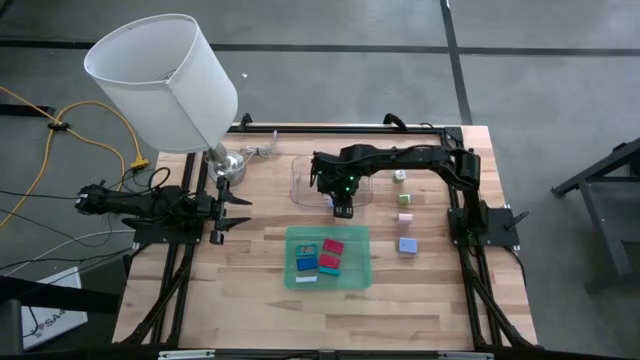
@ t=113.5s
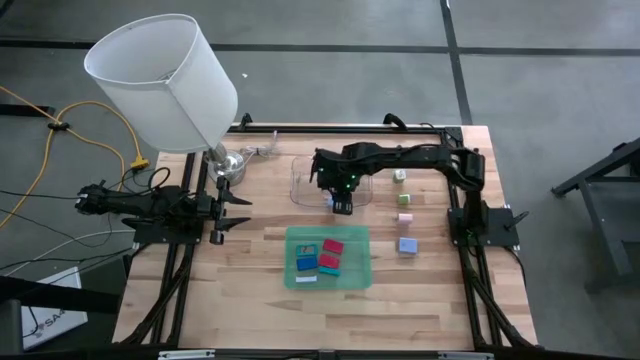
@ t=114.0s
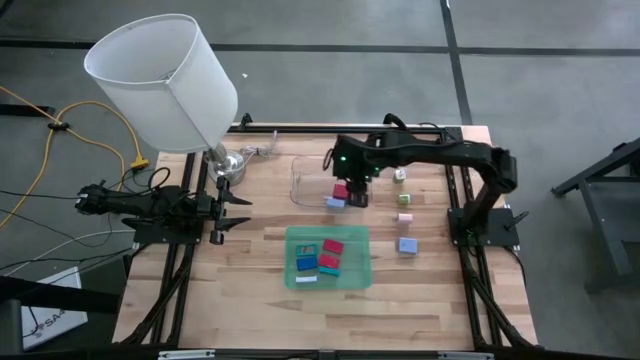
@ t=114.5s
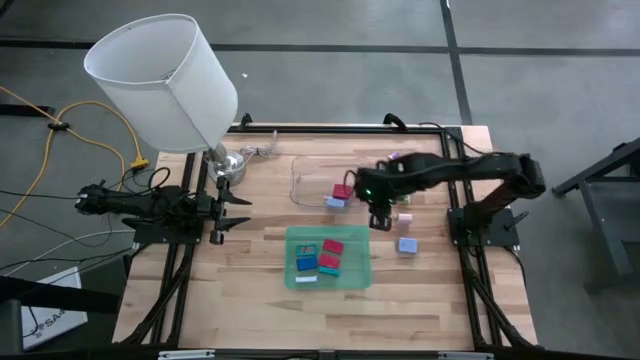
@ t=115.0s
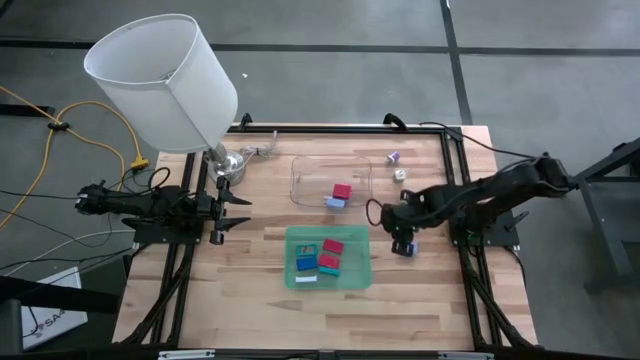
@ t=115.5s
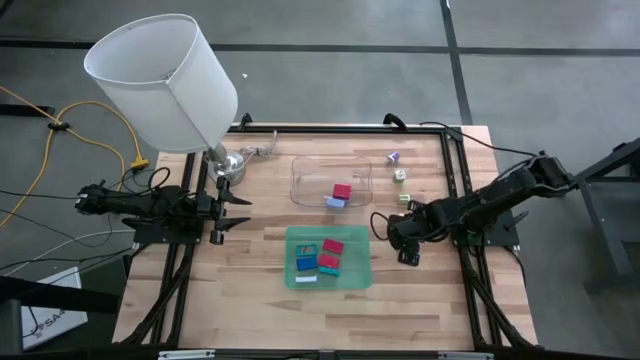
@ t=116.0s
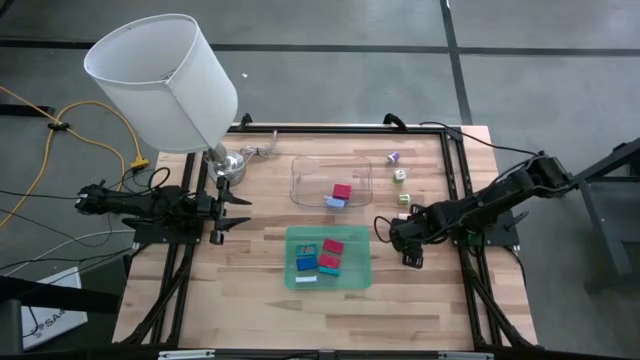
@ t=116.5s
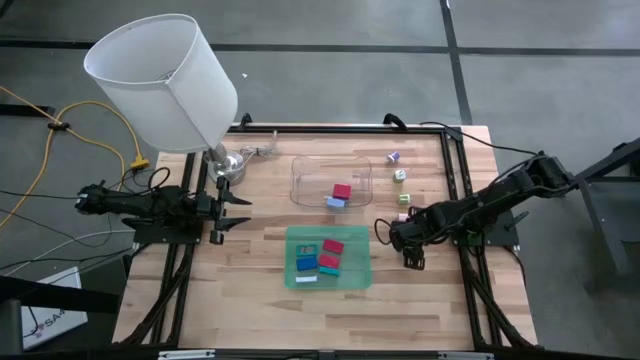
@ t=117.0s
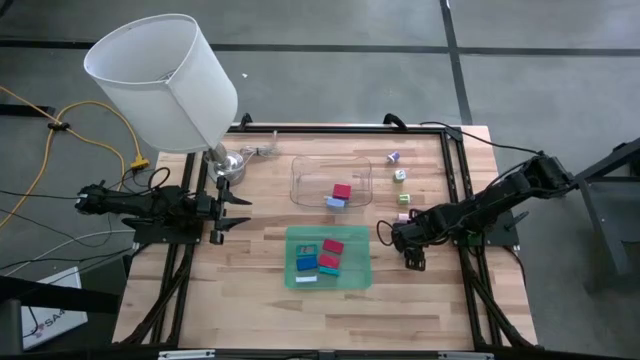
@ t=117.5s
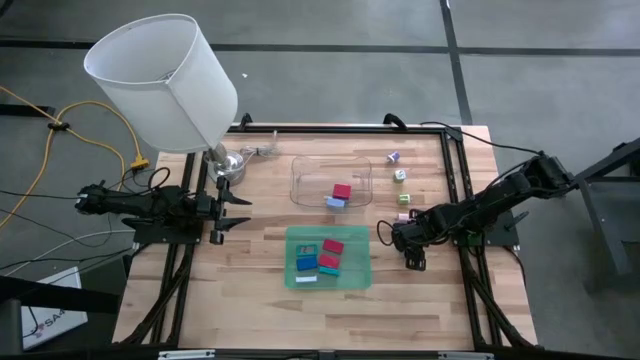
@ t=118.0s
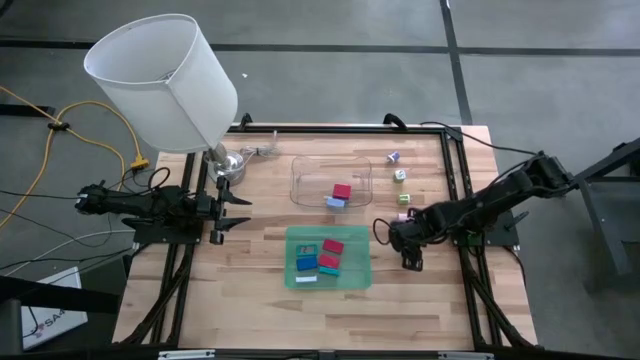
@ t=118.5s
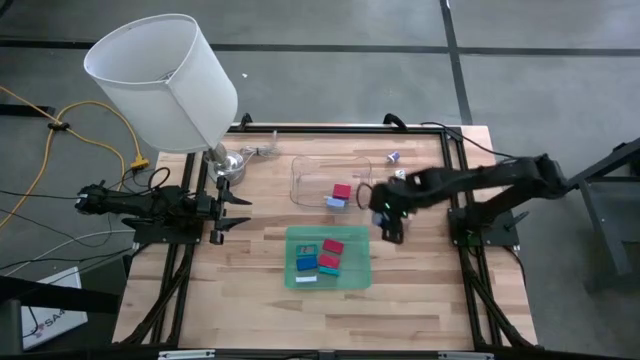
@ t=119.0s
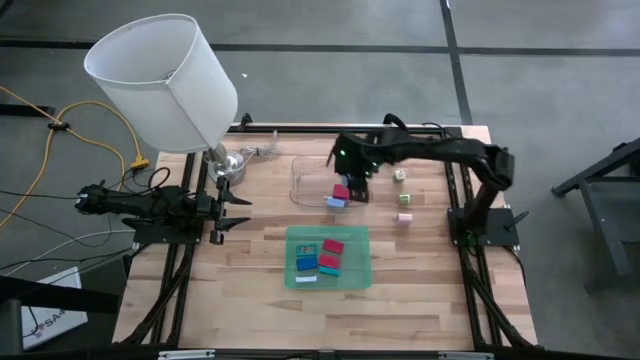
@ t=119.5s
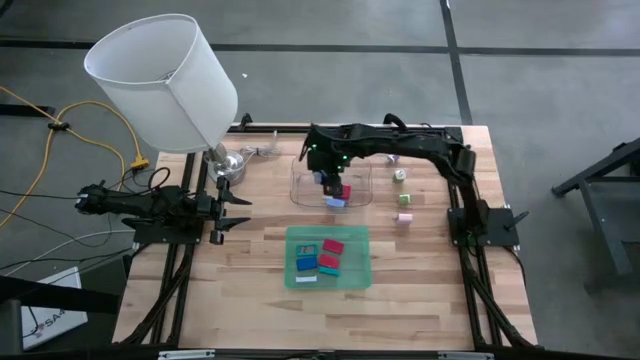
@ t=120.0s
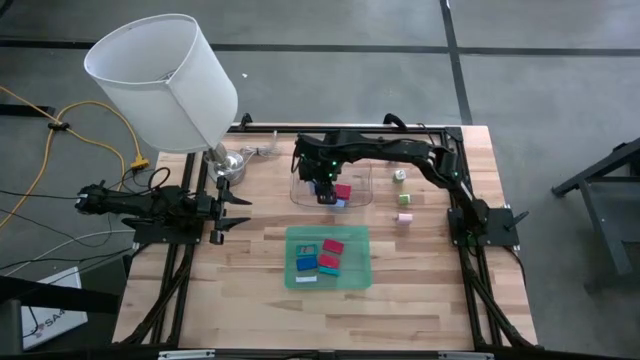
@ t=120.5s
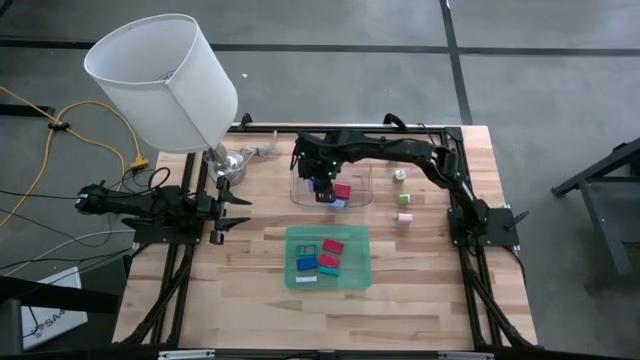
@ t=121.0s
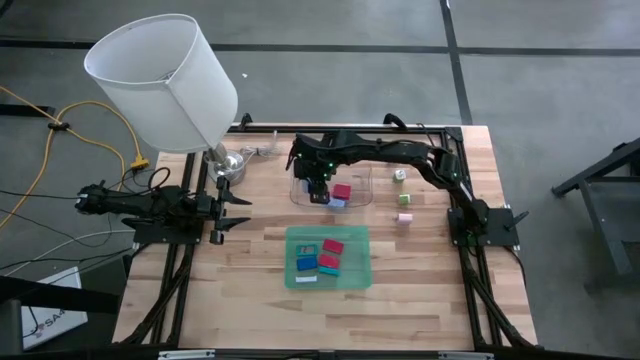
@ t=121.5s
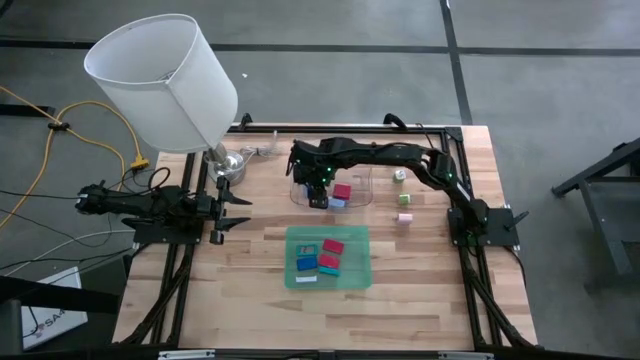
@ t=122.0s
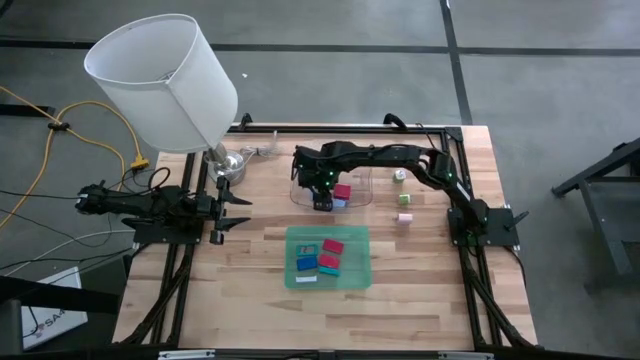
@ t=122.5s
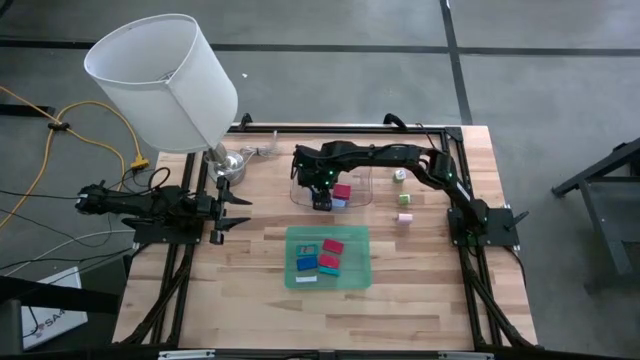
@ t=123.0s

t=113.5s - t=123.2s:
Task: Pick & Place Office items
Put the purple charger adapter into transparent bin

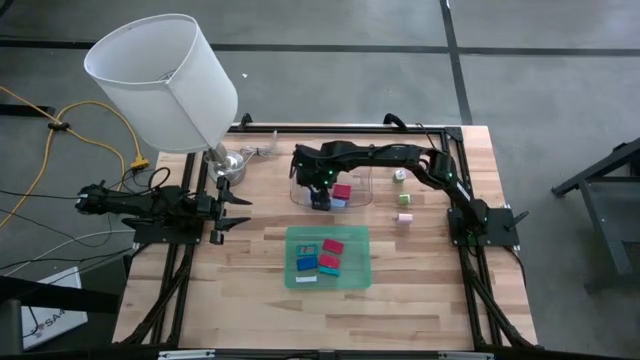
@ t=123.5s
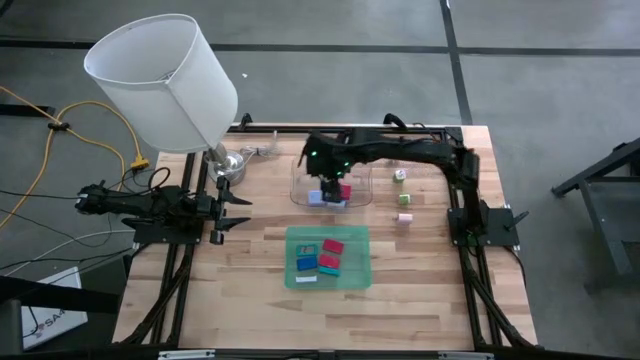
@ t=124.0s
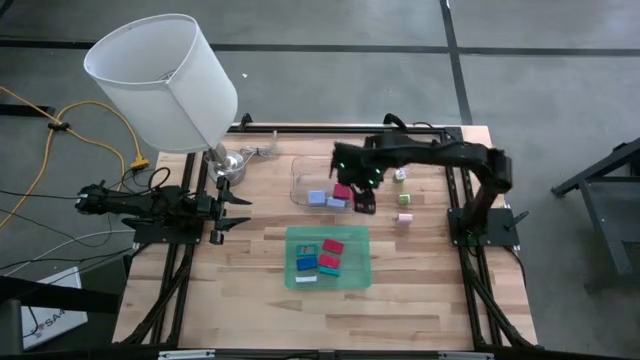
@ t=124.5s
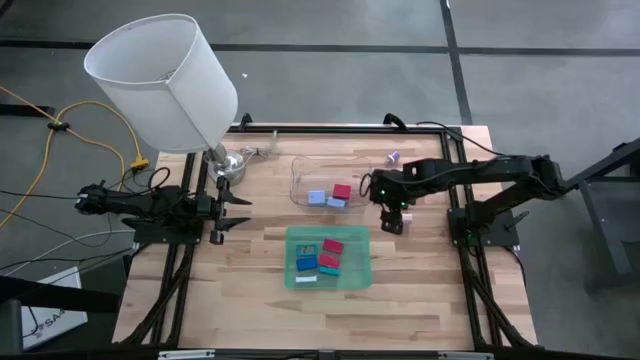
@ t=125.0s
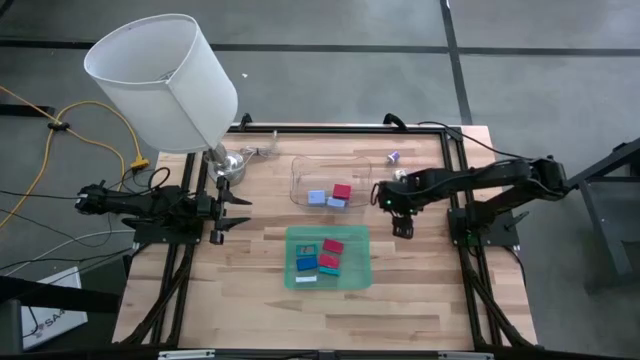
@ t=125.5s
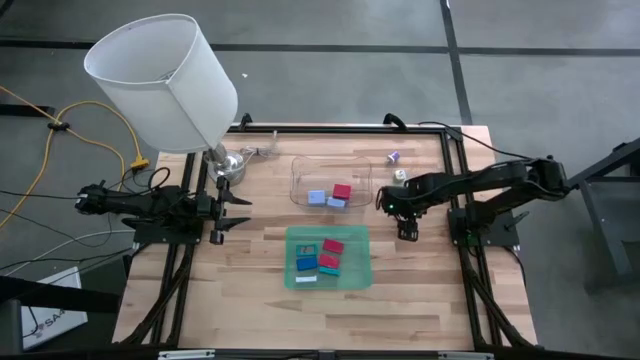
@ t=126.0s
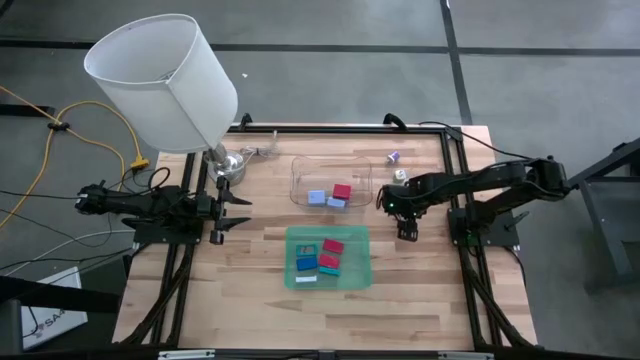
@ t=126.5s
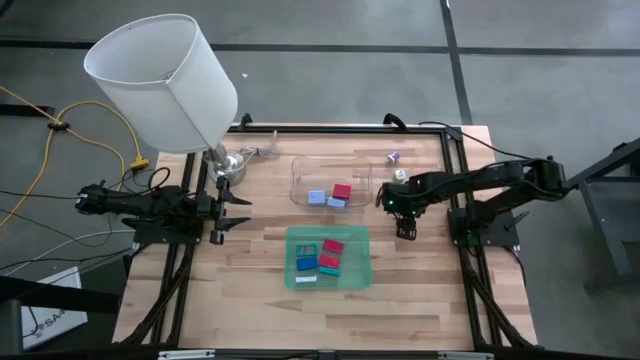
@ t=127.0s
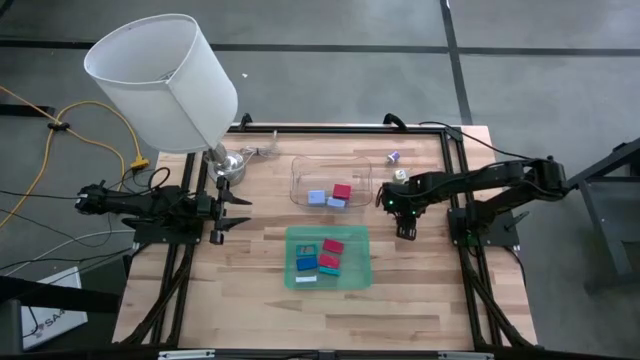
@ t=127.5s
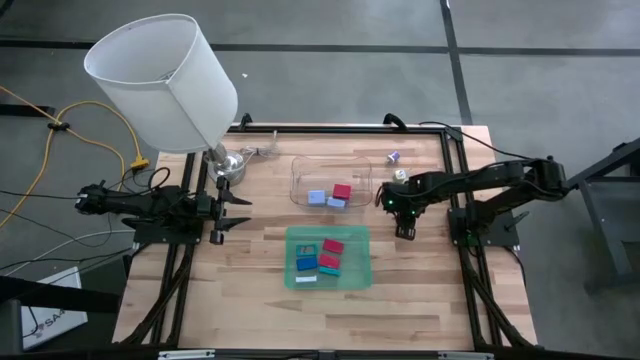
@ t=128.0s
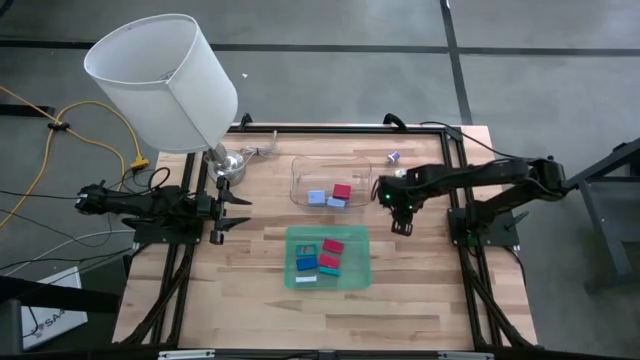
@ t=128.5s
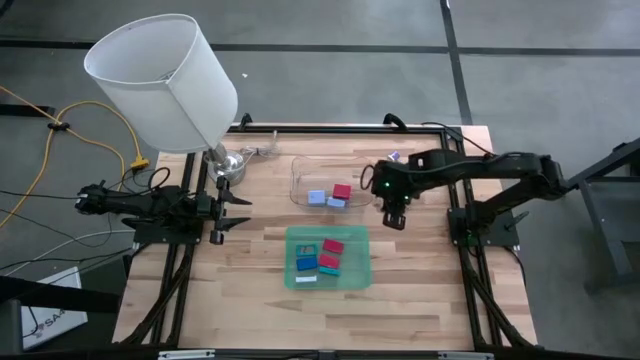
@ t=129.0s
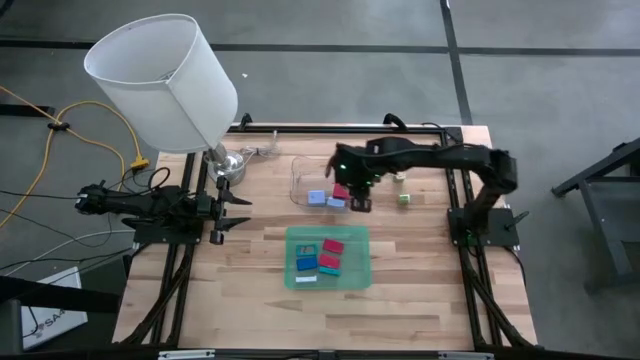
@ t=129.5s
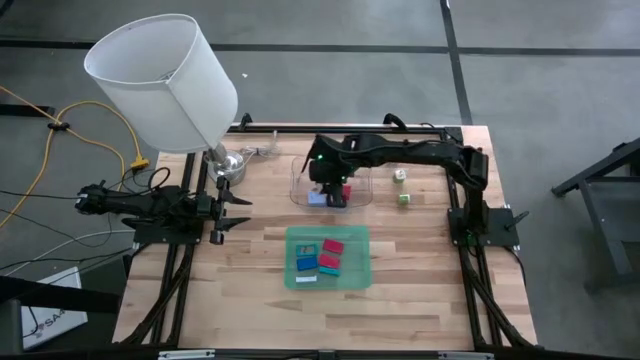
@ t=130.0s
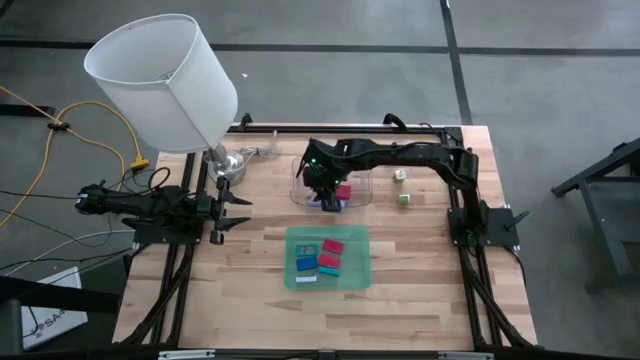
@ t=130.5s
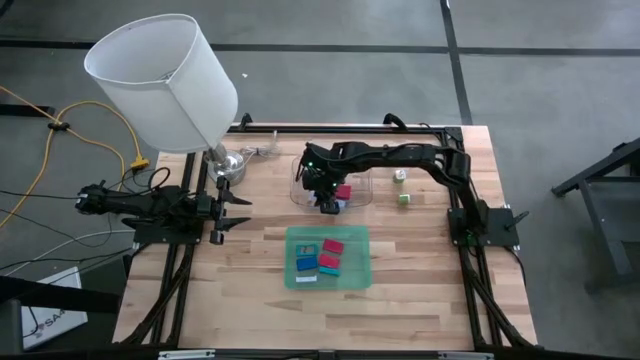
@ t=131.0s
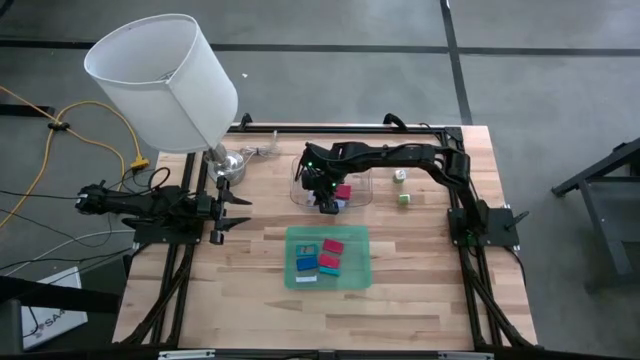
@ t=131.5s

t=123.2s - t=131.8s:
Put the white charger adapter into transparent bin

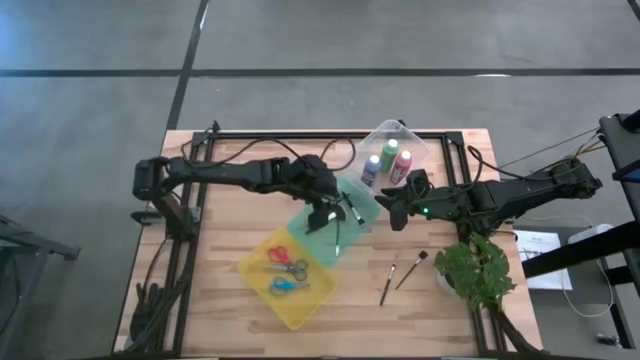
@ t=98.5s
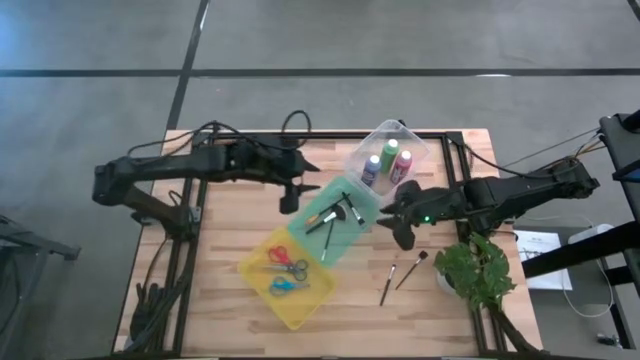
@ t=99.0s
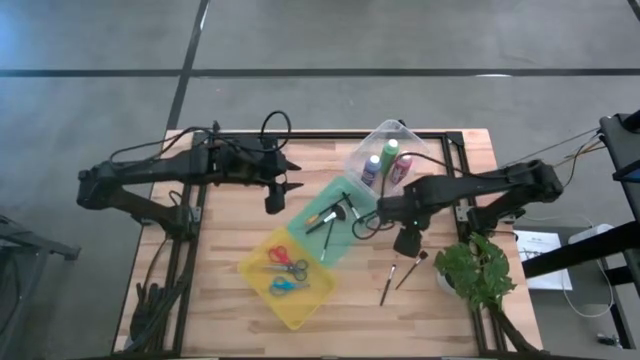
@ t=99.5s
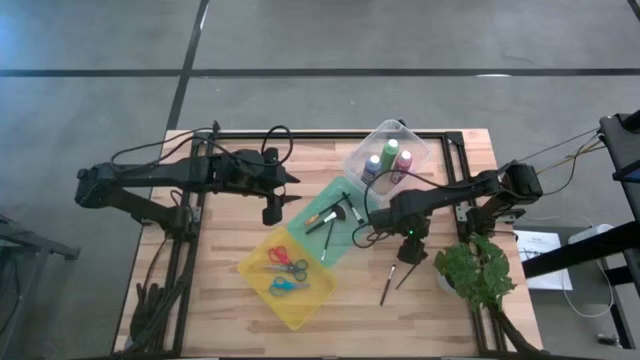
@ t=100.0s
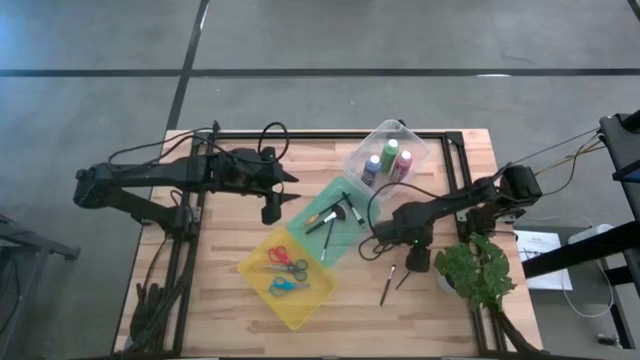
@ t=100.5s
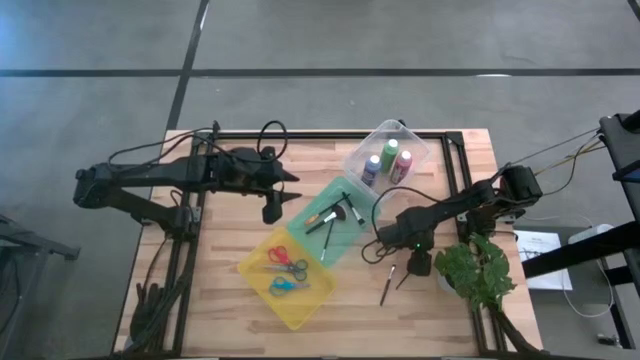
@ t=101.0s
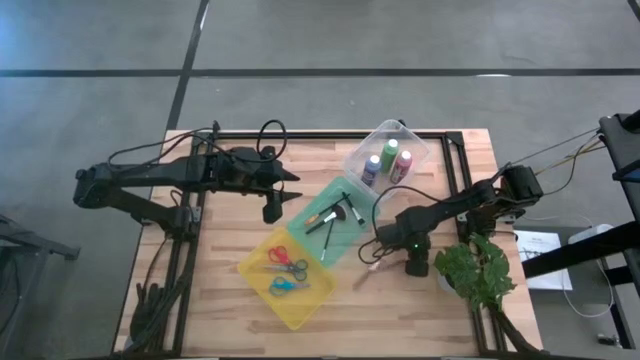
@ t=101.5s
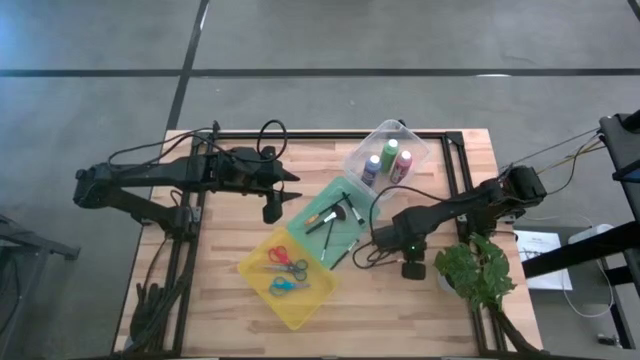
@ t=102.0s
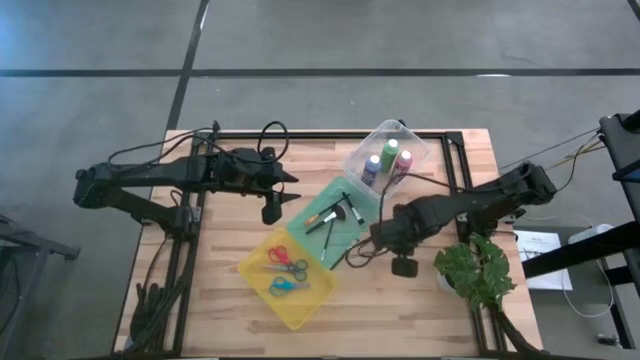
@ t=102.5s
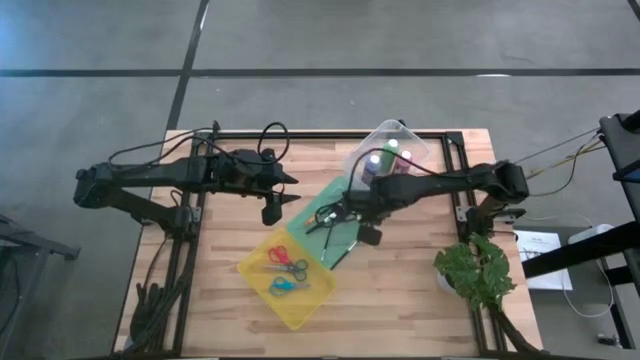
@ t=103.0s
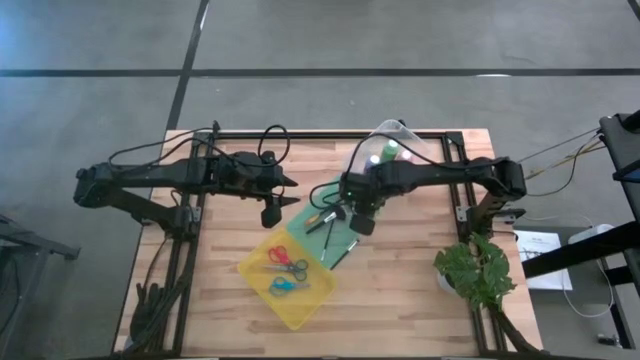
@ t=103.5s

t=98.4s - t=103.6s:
Task: Pick & Place Paint Supplies
Put the black eyebrow brush into the green bin
